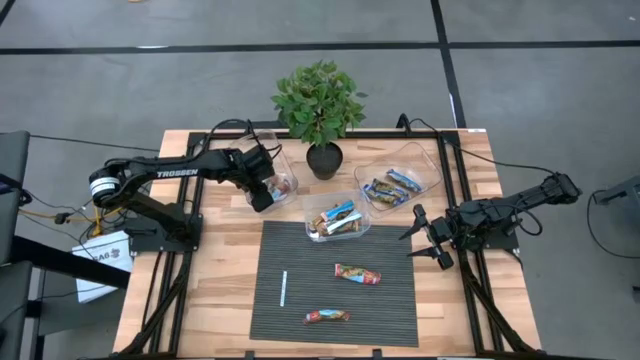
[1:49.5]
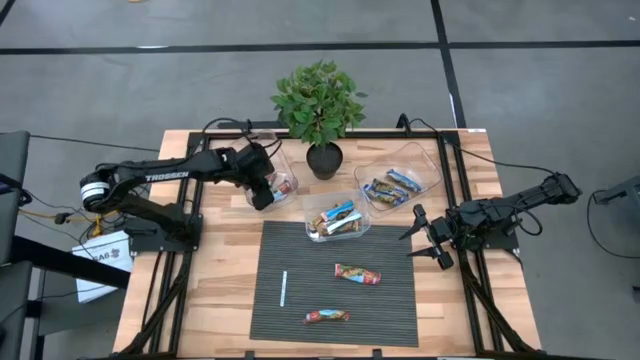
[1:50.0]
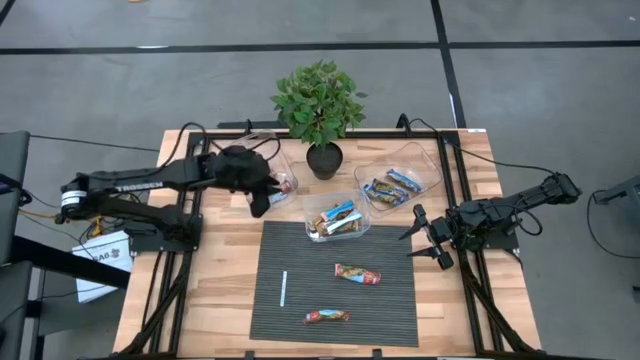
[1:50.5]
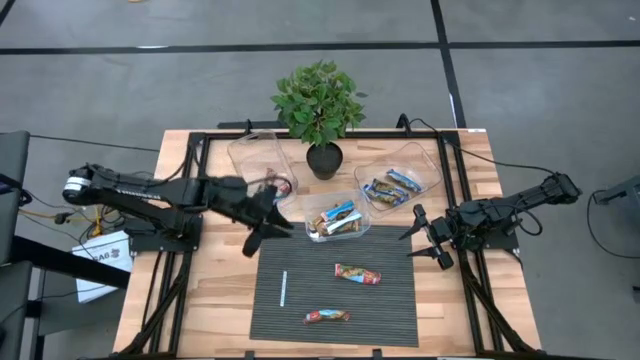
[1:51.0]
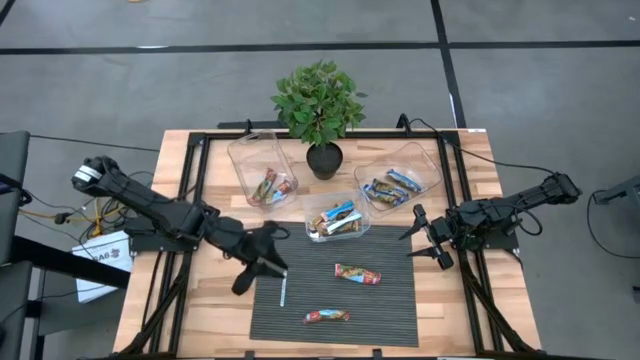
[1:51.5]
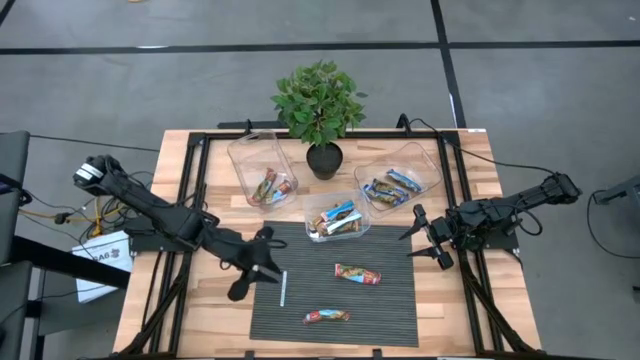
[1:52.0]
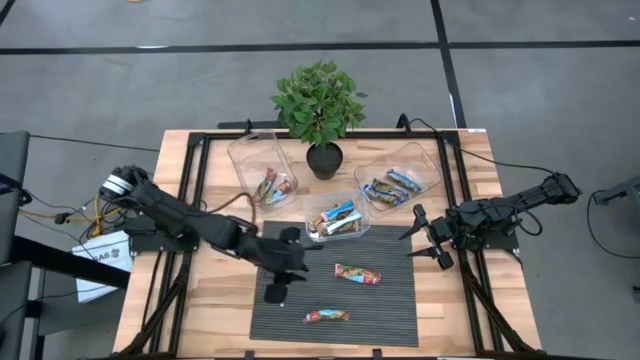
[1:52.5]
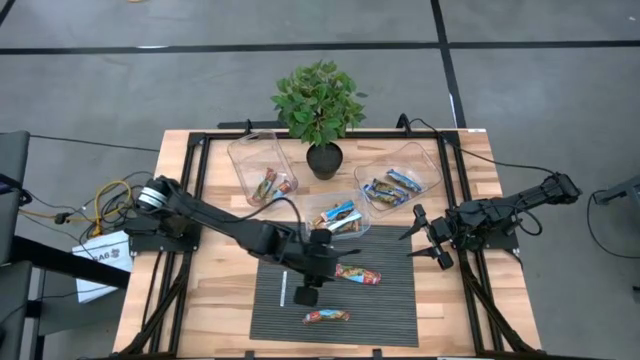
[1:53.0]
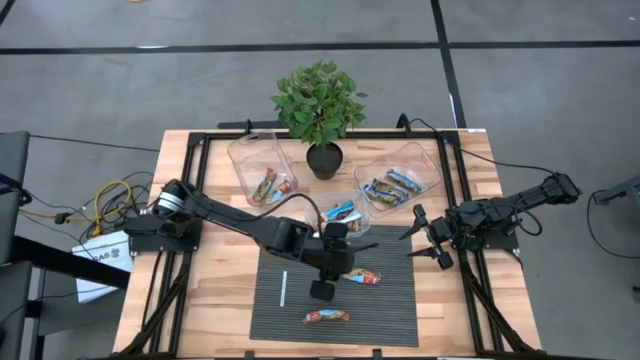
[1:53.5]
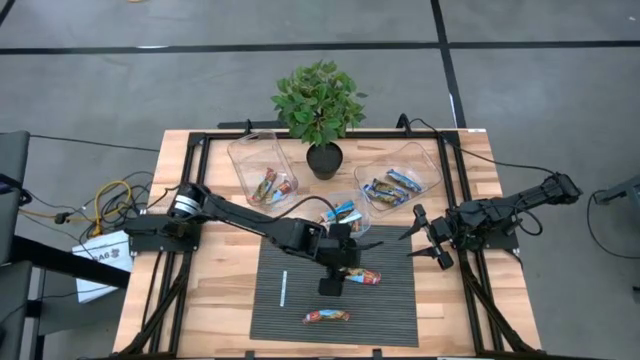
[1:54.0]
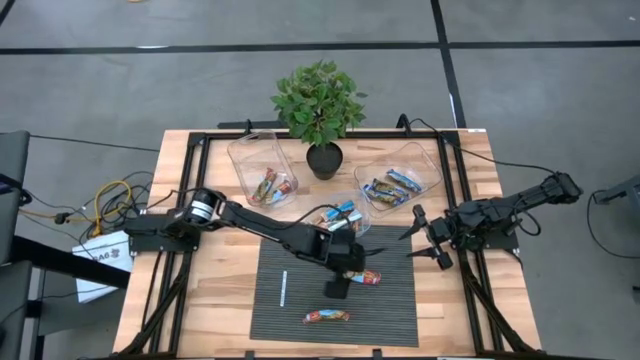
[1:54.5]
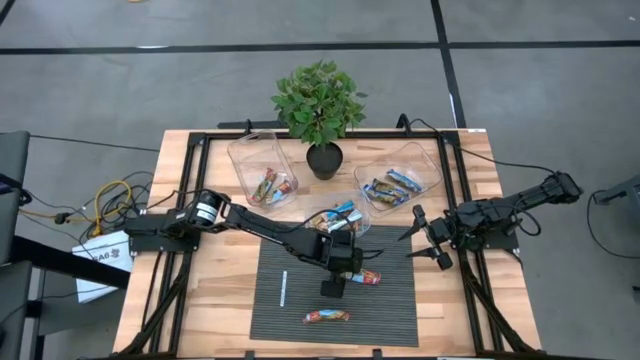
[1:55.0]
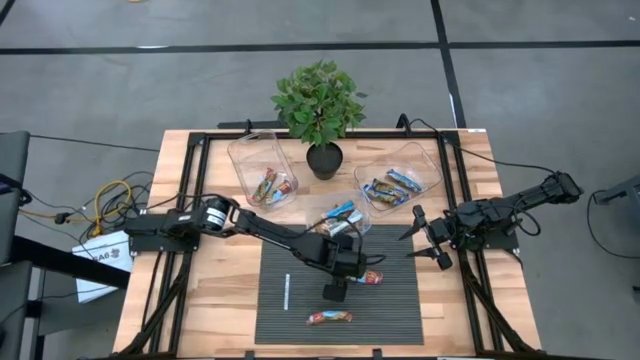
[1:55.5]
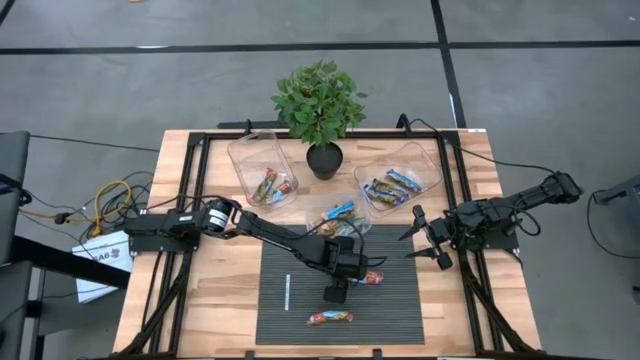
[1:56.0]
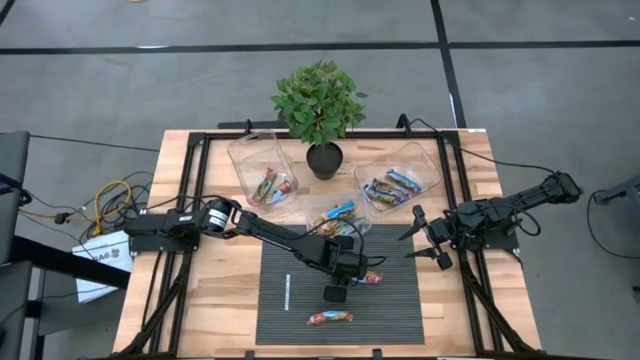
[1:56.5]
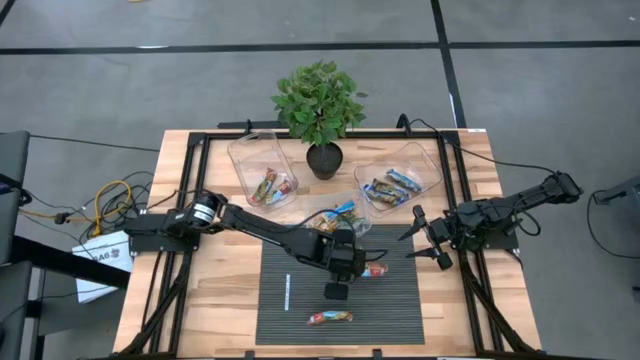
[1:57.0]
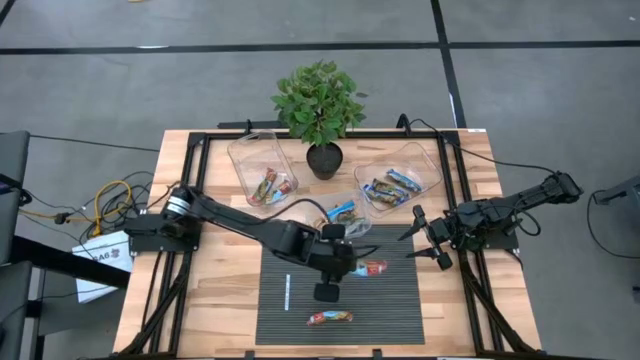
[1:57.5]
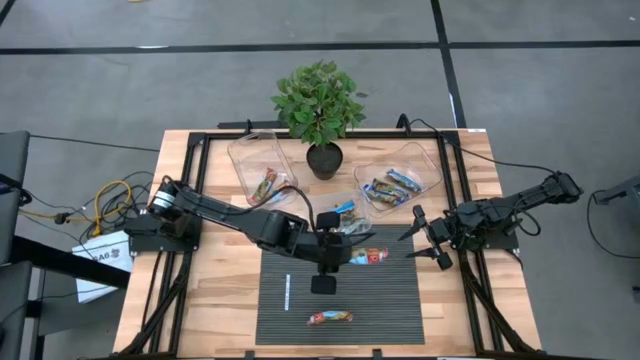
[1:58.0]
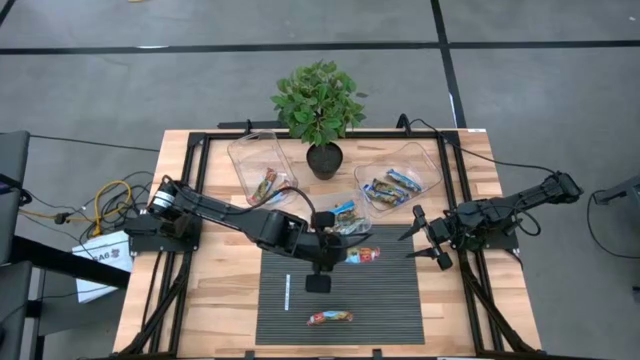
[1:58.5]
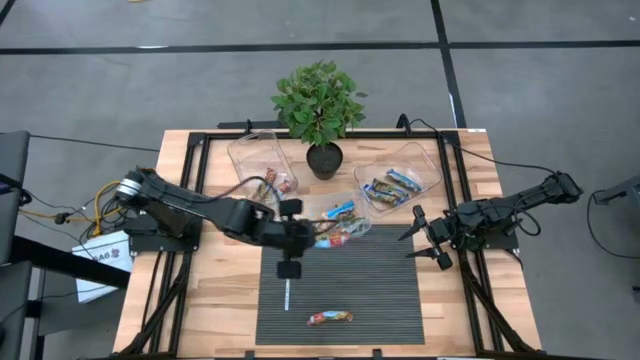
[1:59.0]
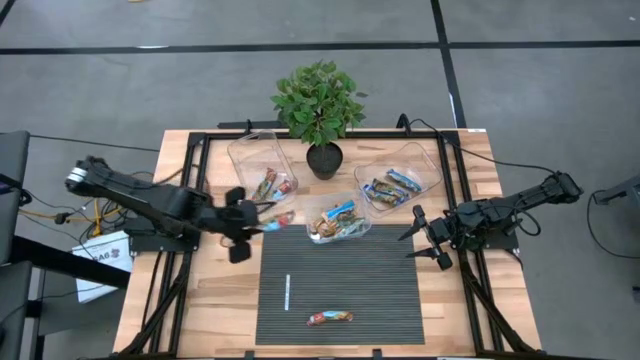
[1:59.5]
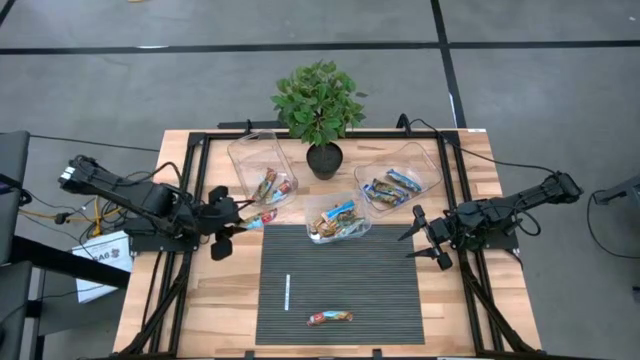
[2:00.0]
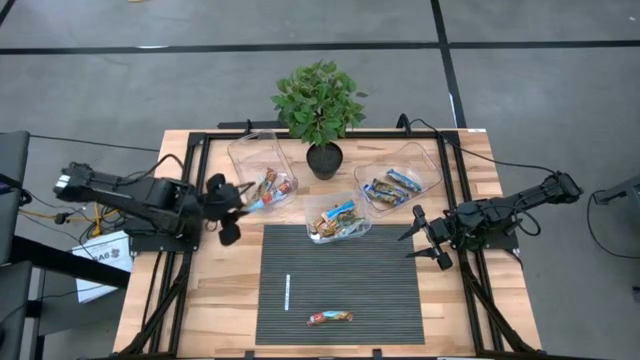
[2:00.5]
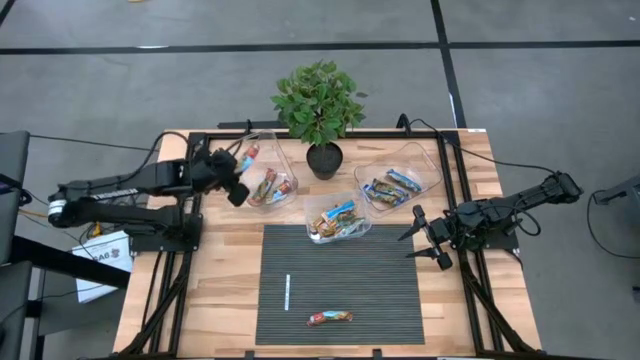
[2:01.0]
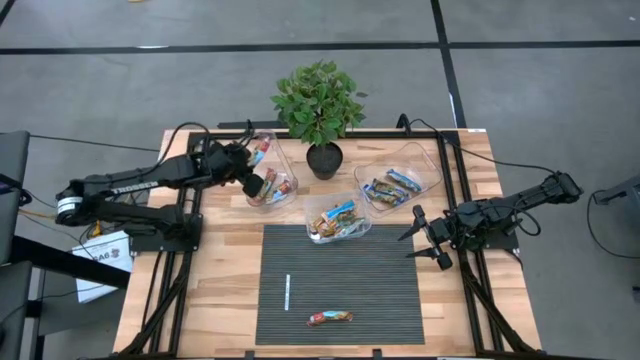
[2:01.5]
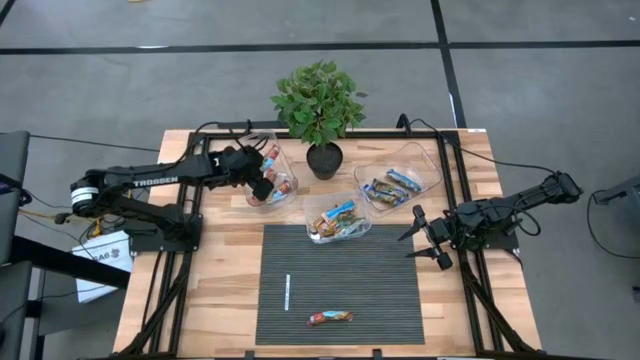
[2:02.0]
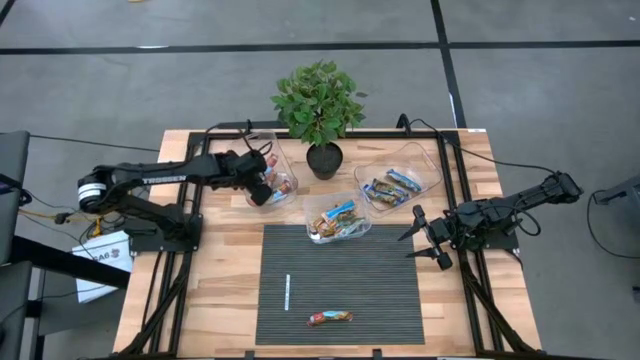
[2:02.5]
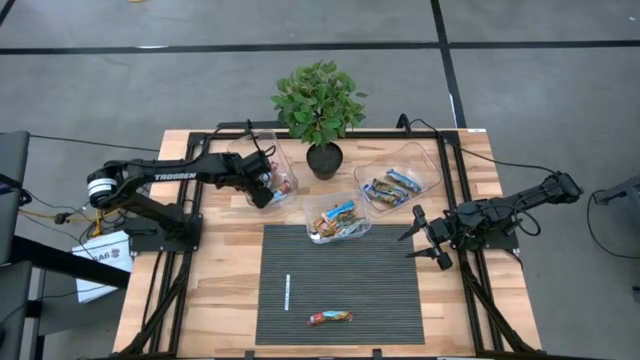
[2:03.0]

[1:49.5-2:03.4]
Task: Pick and place Granola Bars by type
Put the red granola bar into the left transparent bin

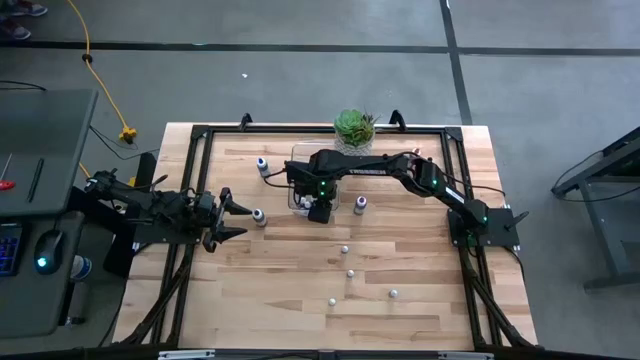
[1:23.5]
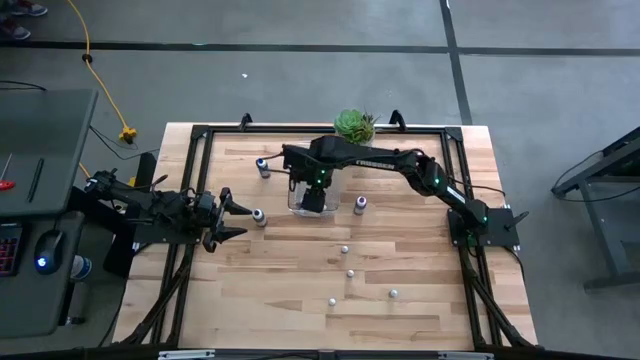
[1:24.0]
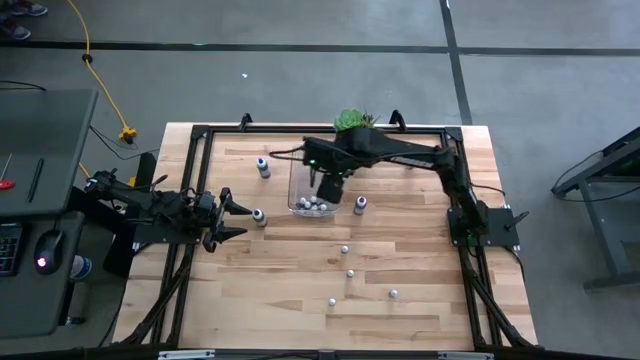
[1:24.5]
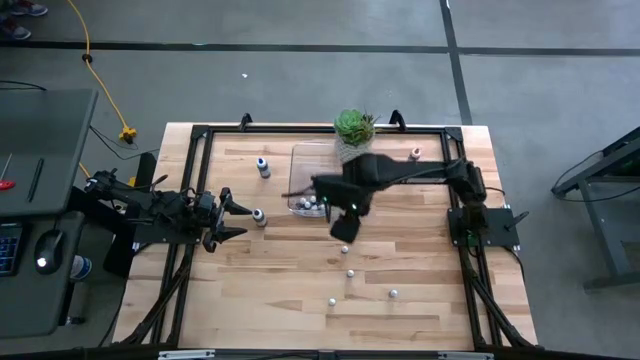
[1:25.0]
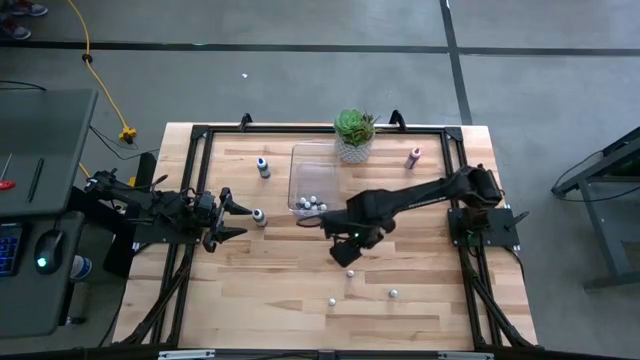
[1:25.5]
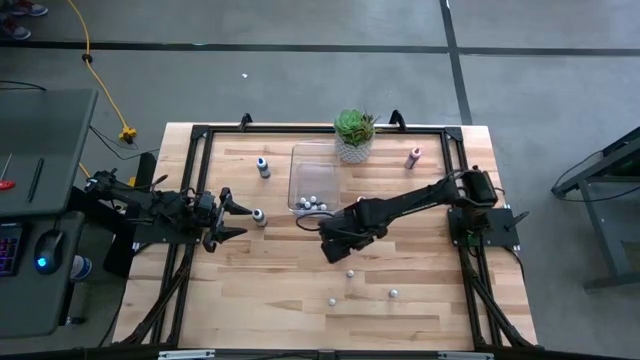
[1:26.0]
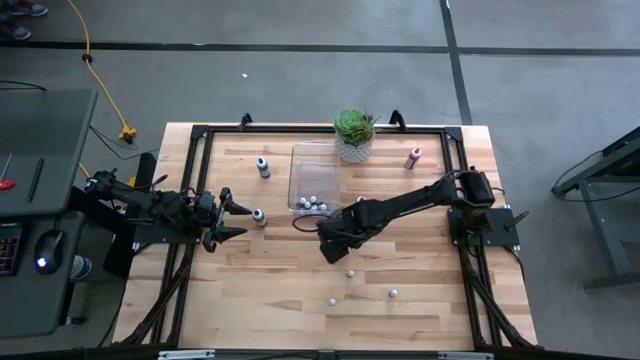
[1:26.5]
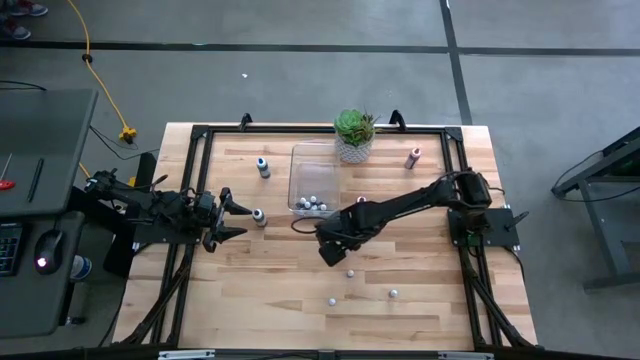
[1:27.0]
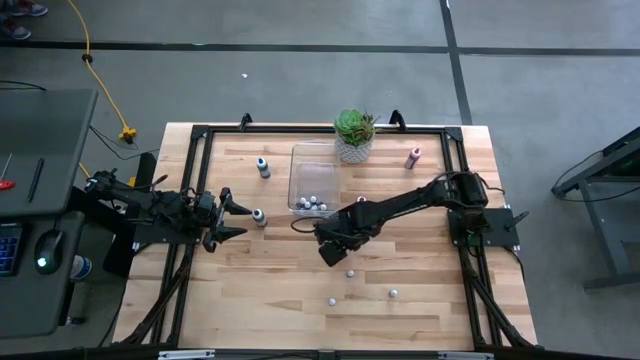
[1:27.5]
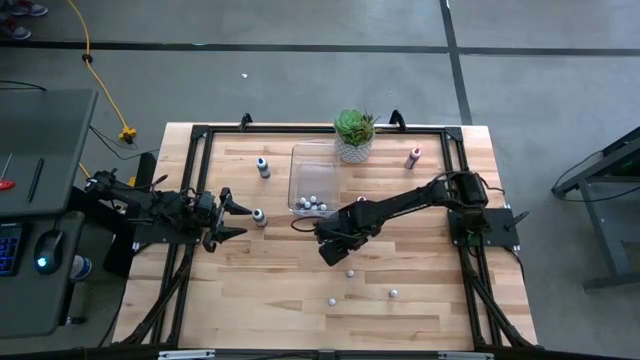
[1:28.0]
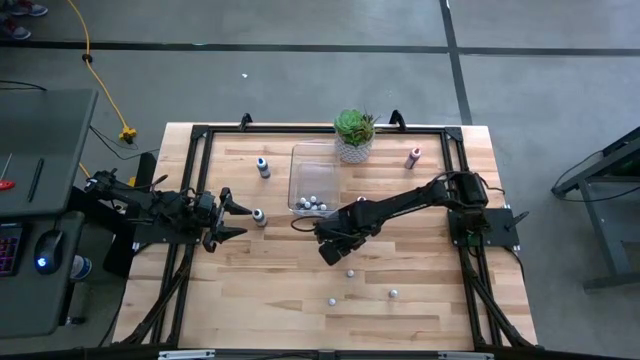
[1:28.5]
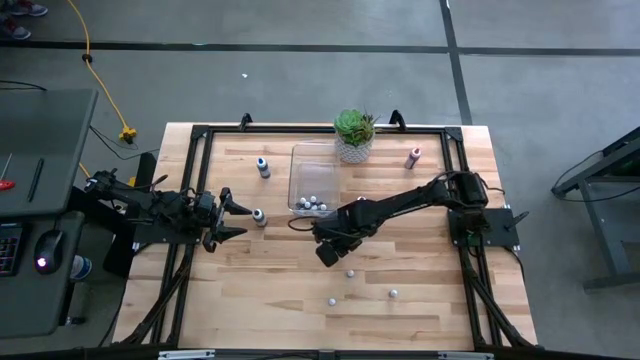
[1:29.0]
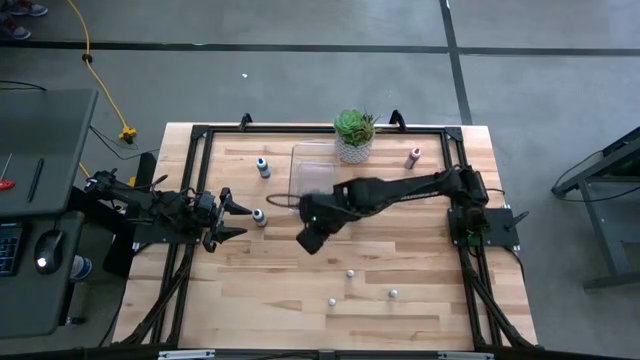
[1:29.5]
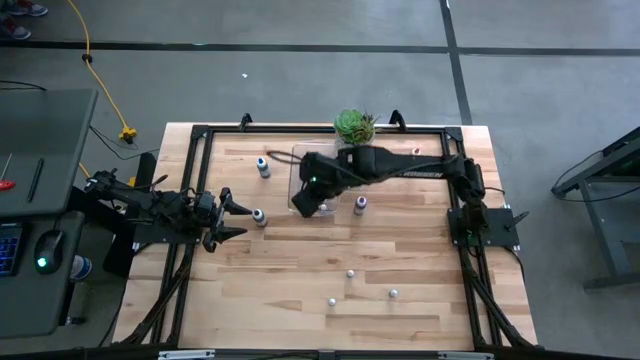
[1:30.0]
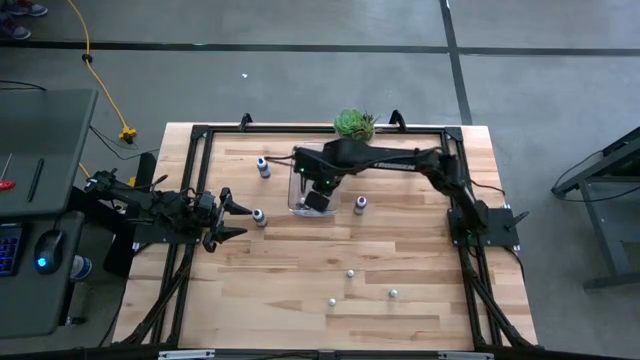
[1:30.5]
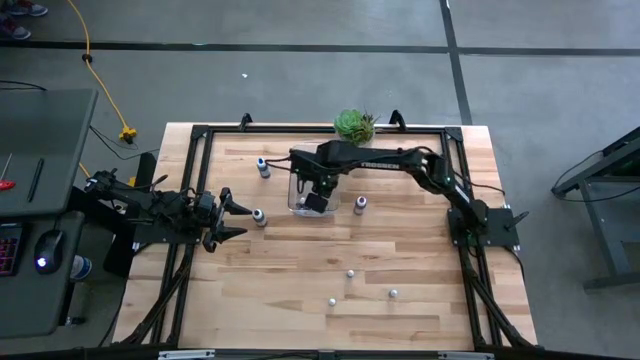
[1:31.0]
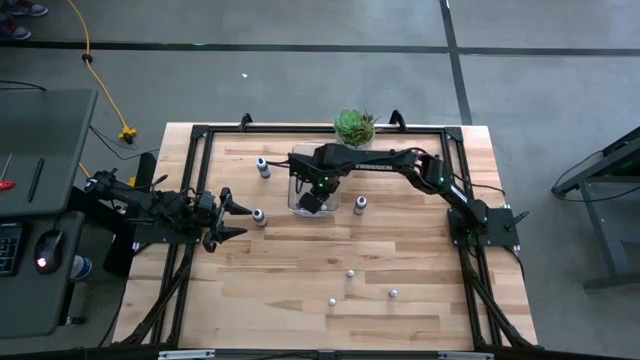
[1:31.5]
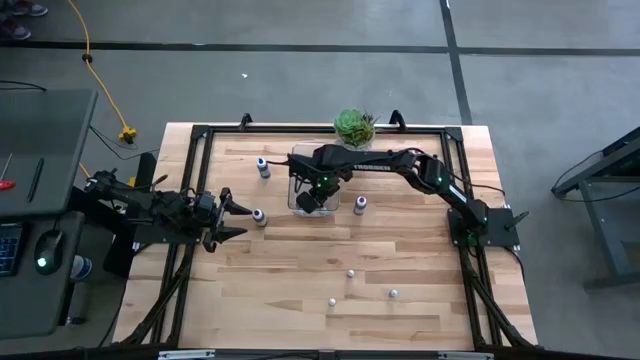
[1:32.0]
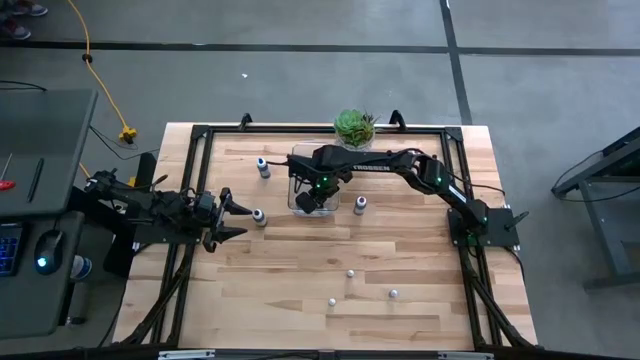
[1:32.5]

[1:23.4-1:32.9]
Task: Pick & Place food coloring
Put the small black food coloring bottle into the transparent bin
